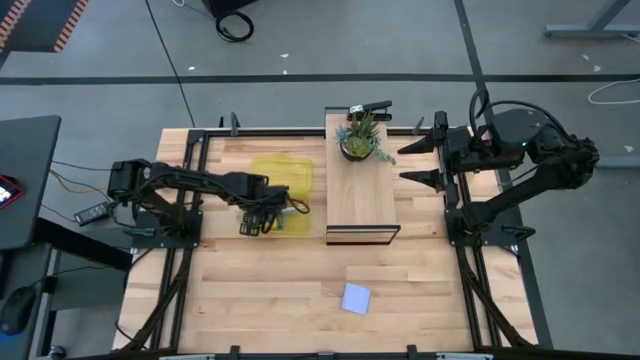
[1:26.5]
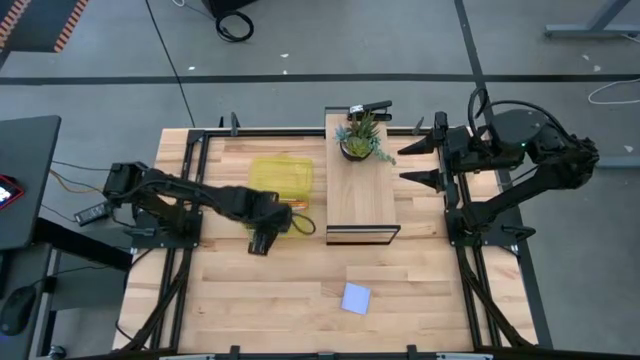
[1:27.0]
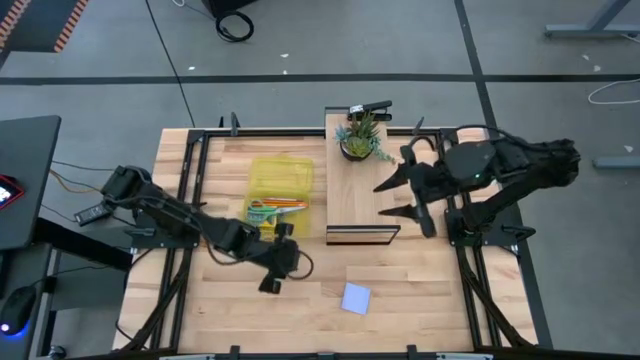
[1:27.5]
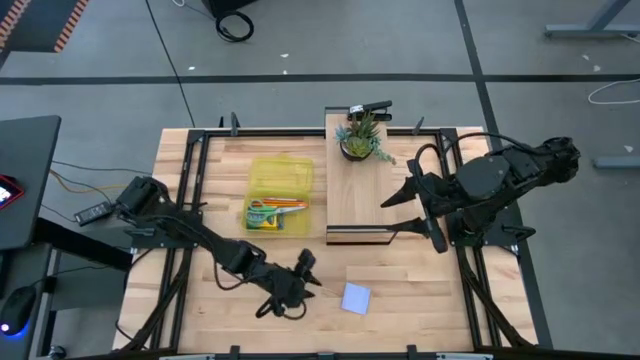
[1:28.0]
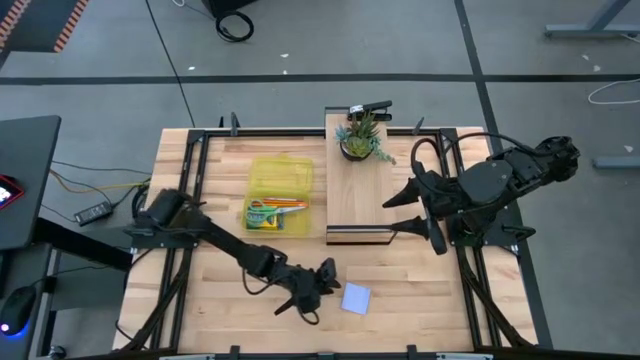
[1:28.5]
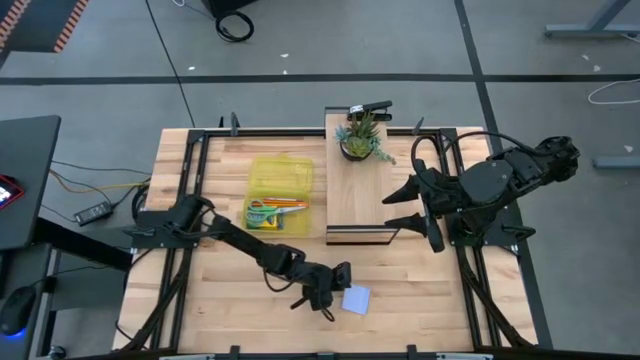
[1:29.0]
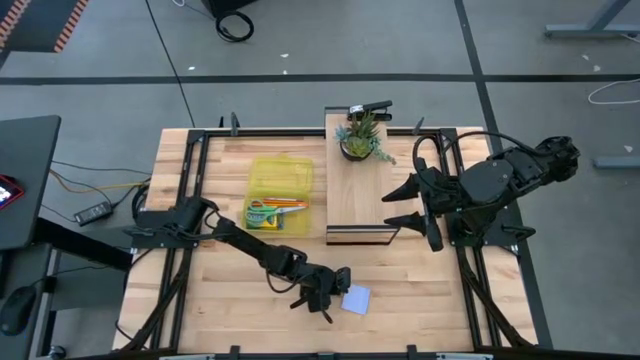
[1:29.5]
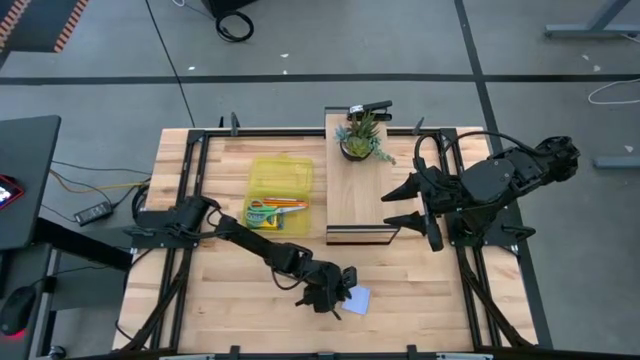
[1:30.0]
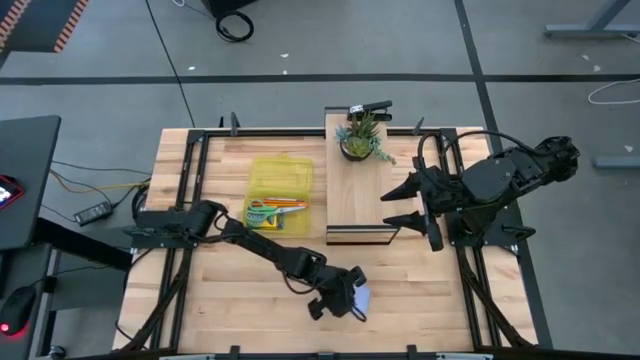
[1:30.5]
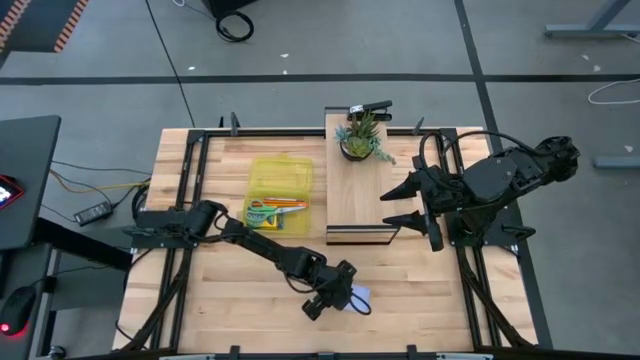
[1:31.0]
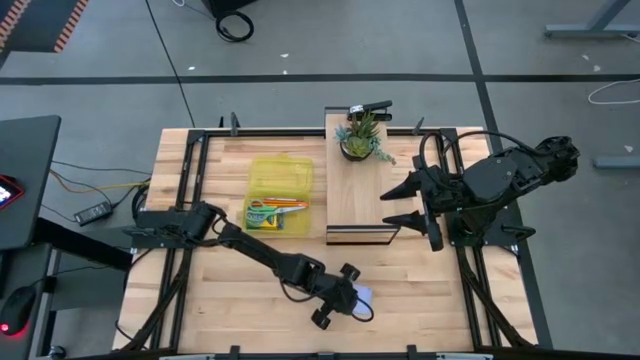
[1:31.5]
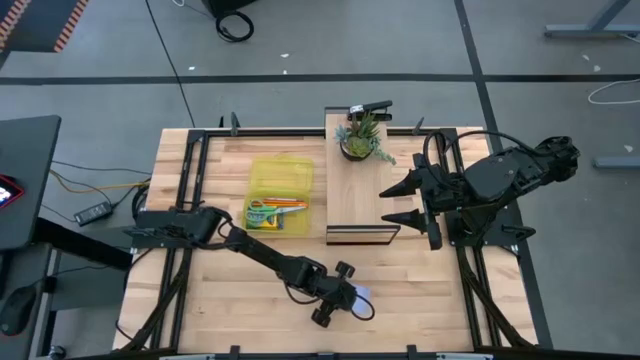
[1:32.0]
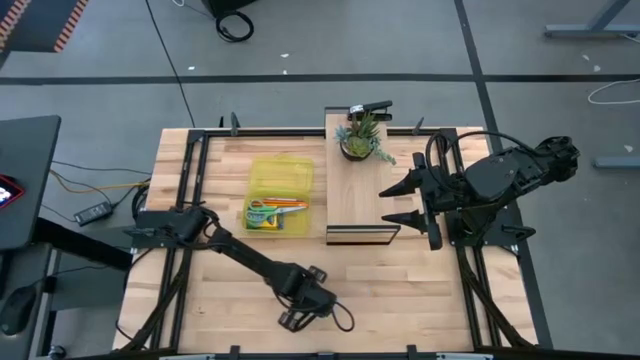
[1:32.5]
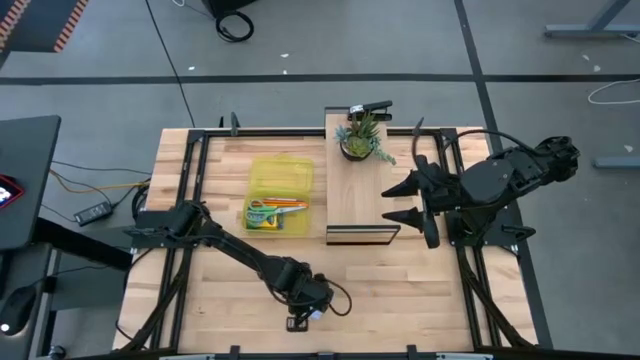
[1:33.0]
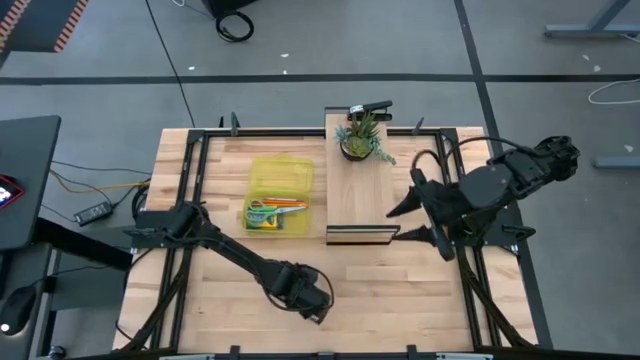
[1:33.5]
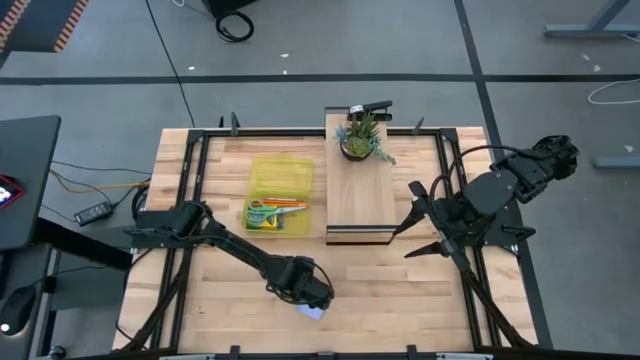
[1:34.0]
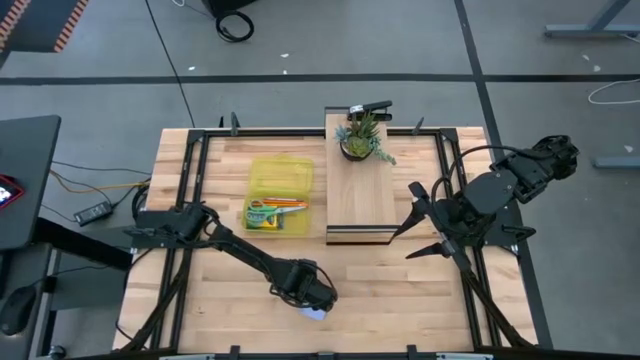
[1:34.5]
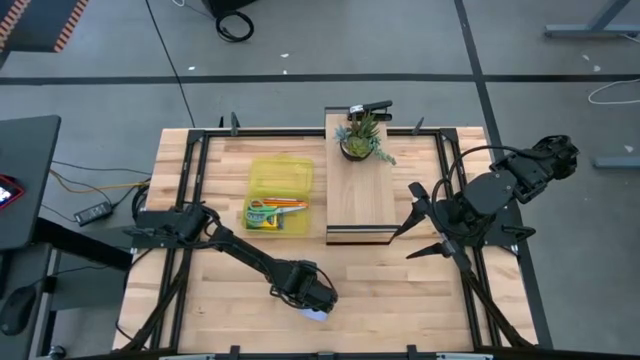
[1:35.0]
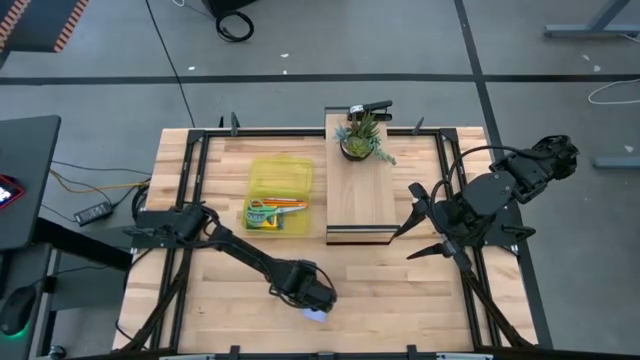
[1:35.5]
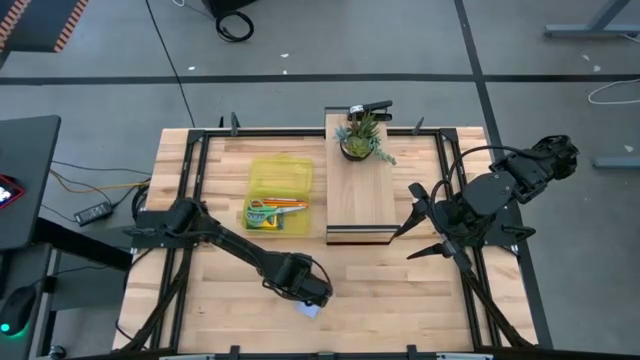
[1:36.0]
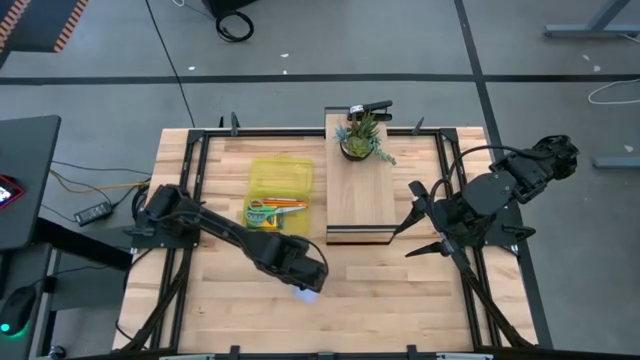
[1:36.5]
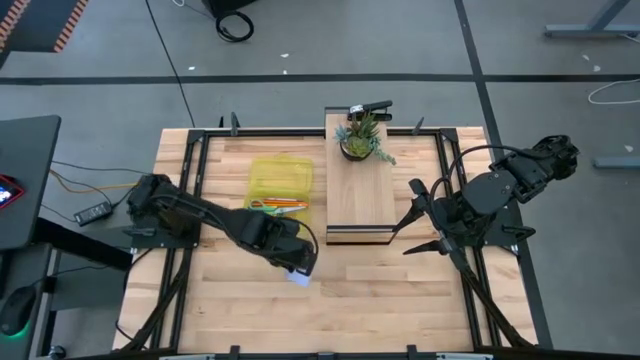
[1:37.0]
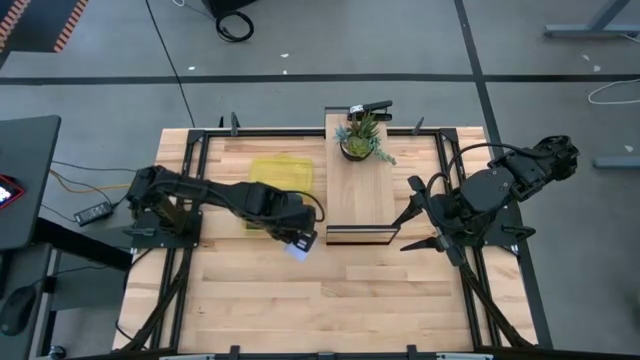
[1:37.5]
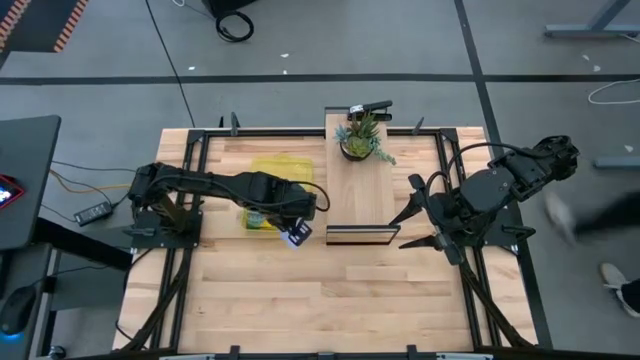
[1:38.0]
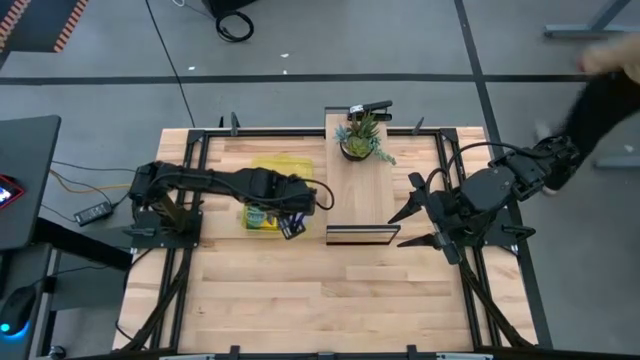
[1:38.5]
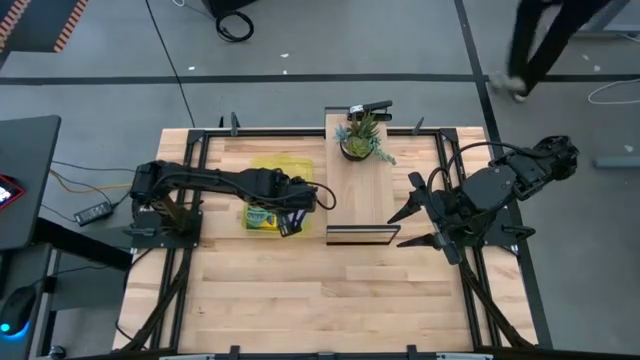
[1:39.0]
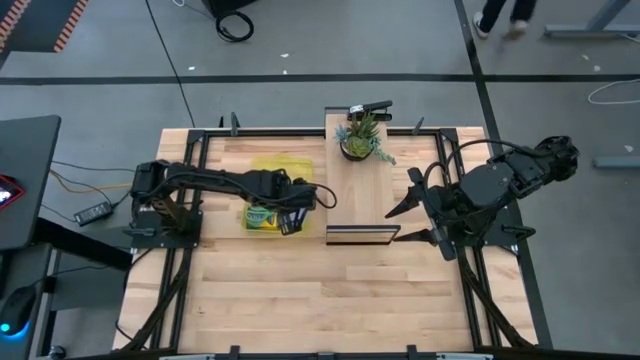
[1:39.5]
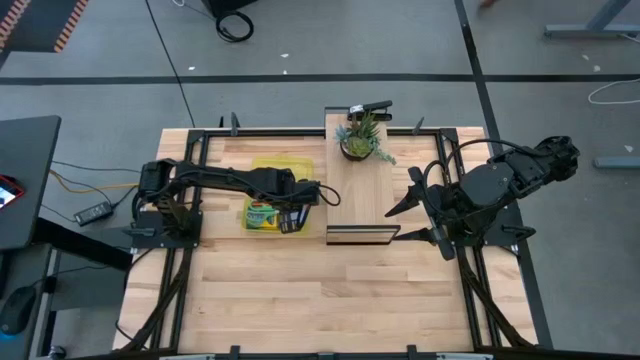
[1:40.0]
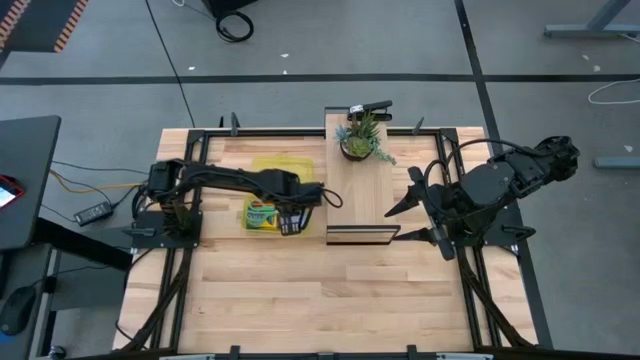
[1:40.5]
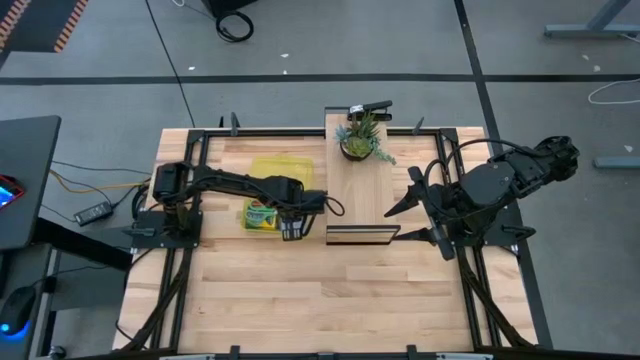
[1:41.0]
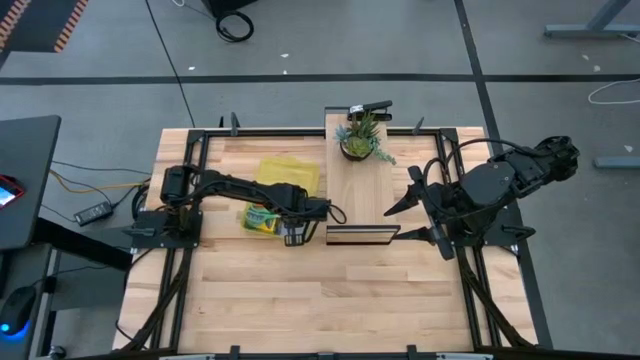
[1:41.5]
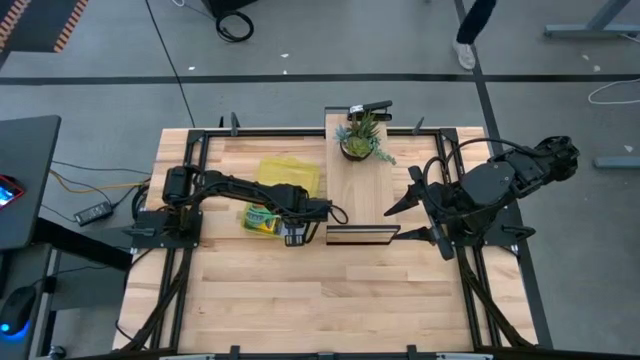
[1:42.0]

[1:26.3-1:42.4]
Task: Pack school essentials
Put the notepad into the supply box

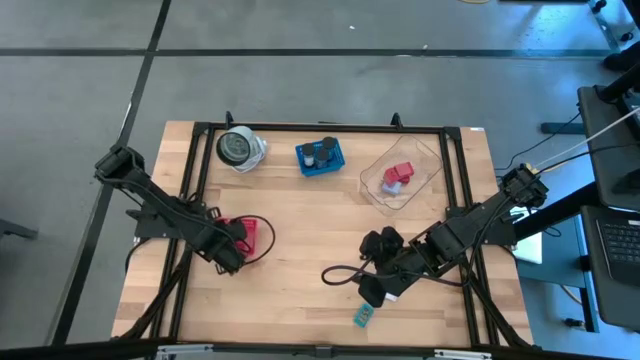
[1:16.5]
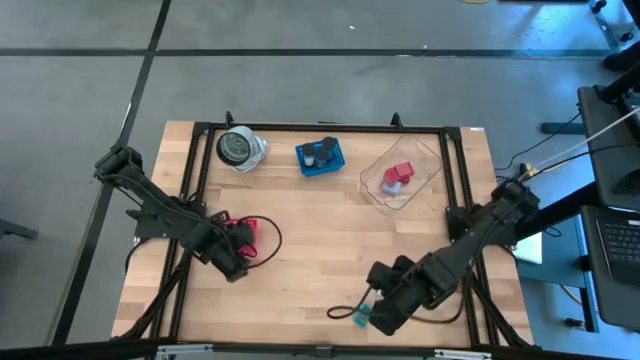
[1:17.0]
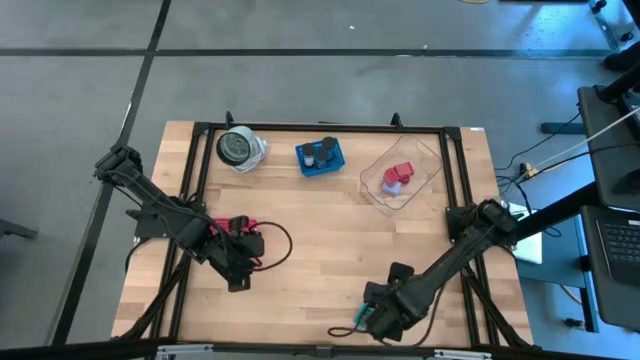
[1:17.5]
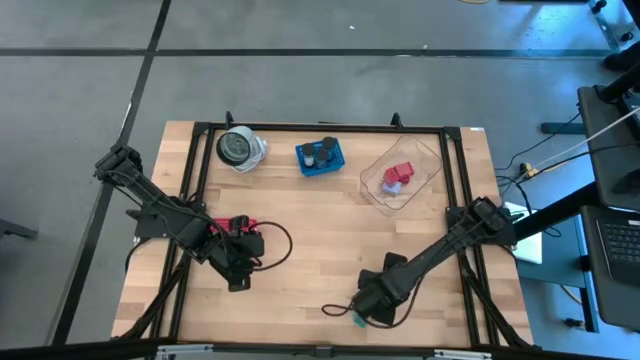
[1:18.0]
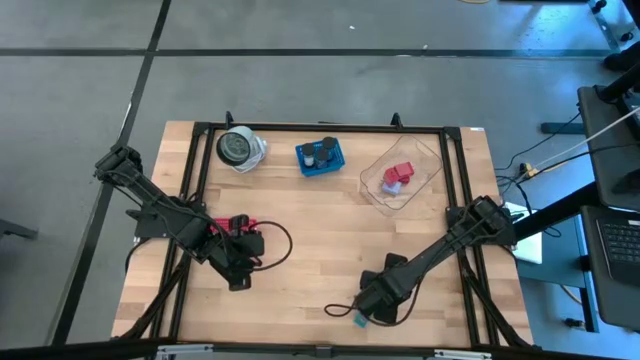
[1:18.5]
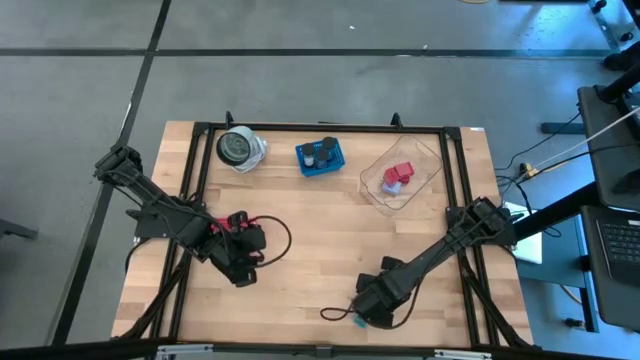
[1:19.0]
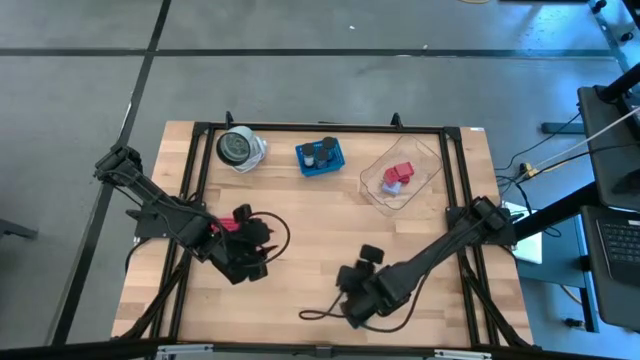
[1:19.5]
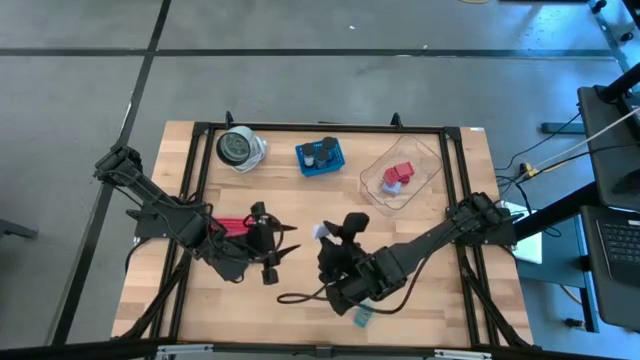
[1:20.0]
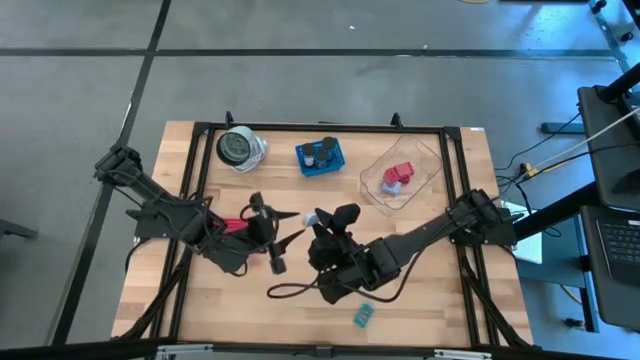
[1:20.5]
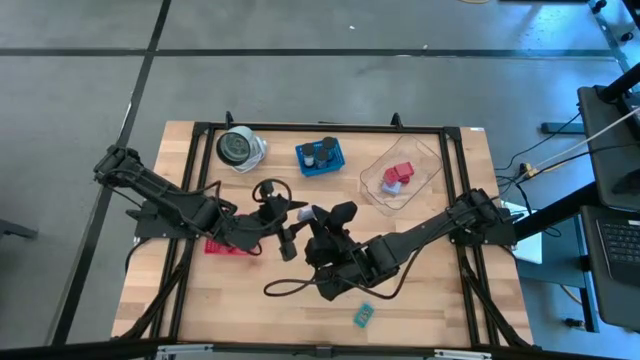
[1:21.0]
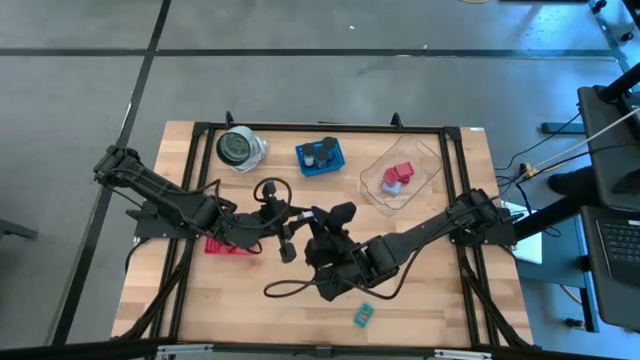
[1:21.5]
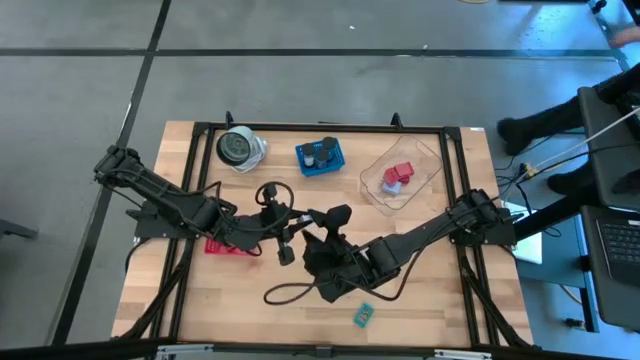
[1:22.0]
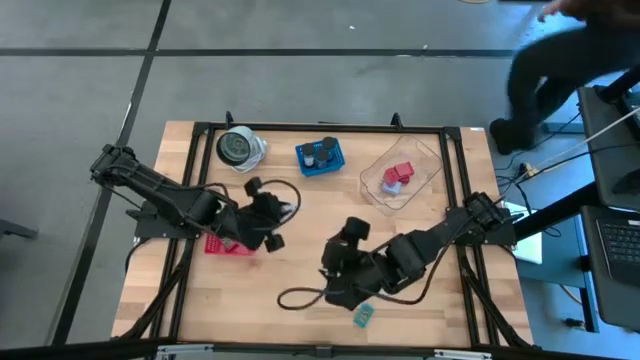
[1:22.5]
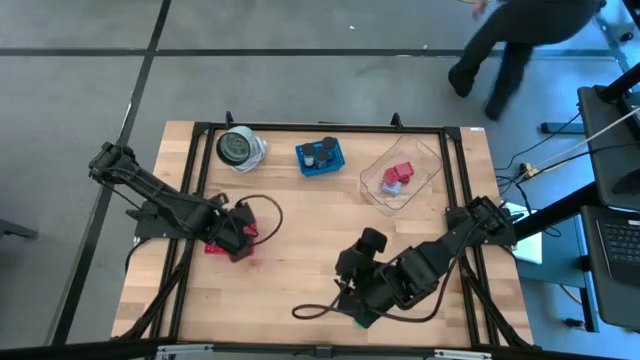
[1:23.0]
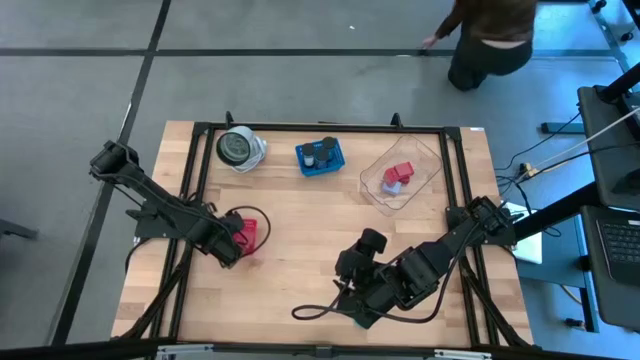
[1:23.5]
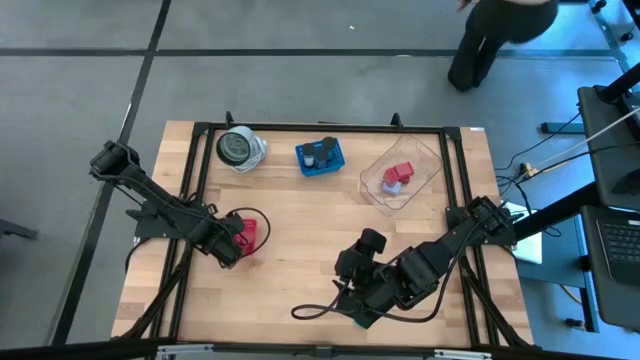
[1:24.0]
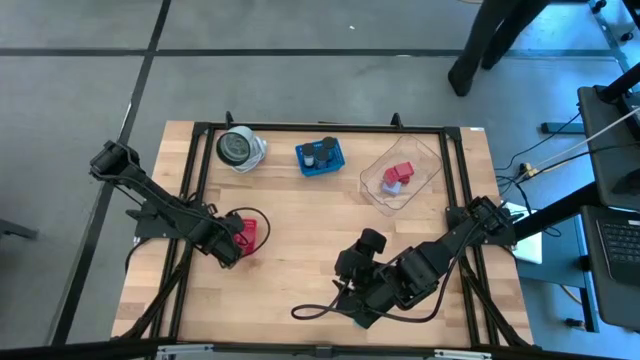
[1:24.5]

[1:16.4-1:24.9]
Task: Pick & Place Office items
Put the white digital clock into the red basket
